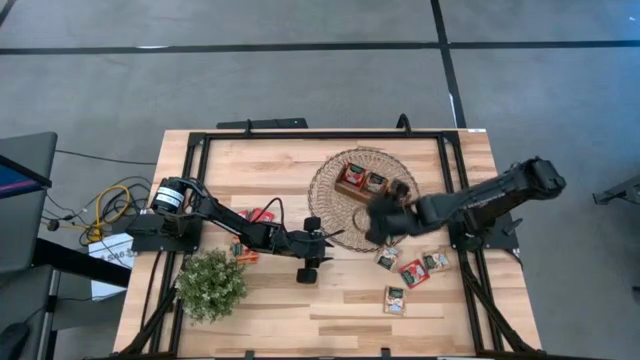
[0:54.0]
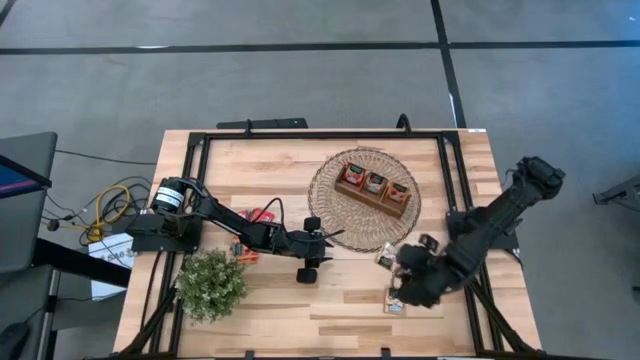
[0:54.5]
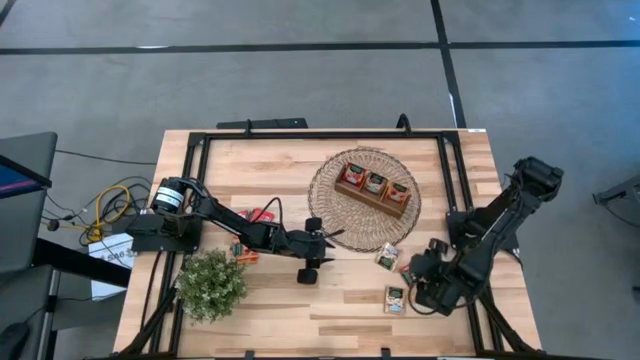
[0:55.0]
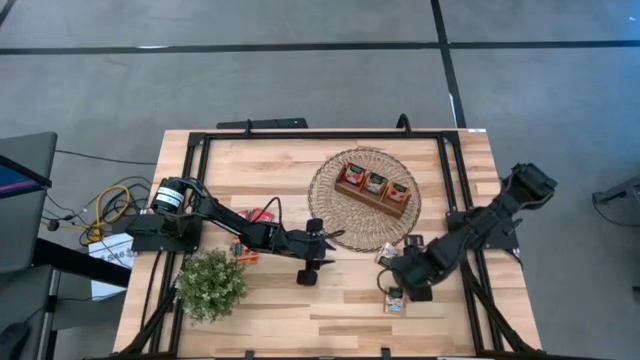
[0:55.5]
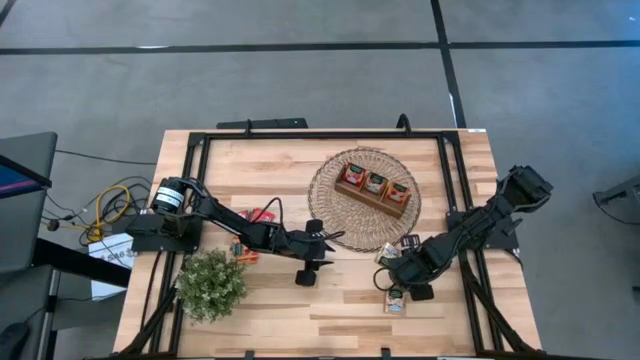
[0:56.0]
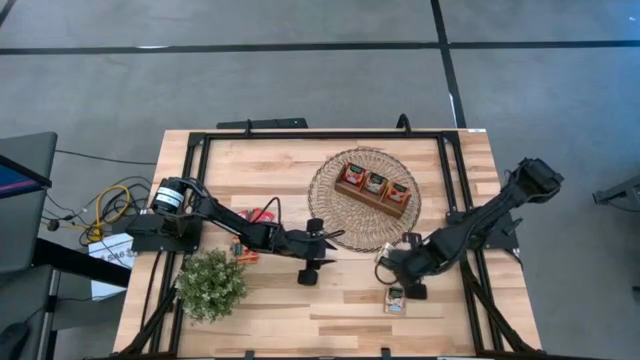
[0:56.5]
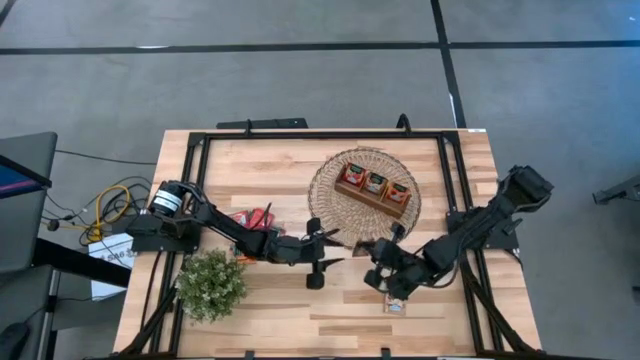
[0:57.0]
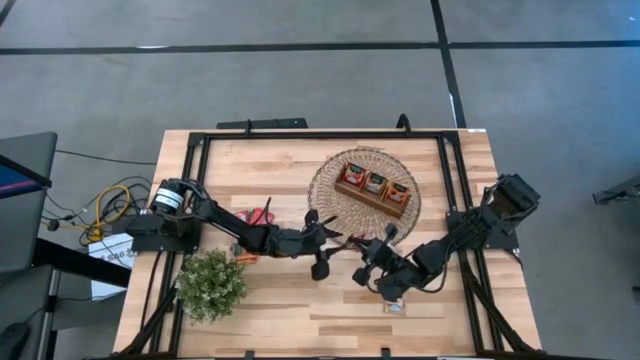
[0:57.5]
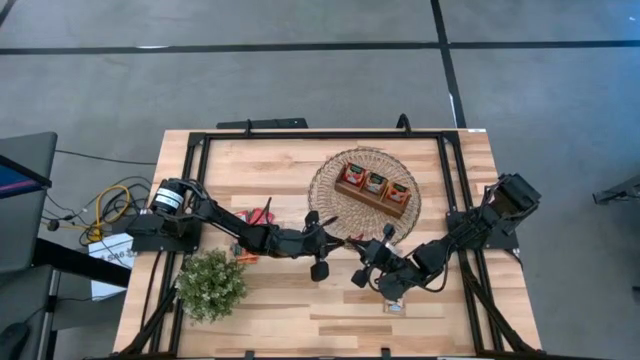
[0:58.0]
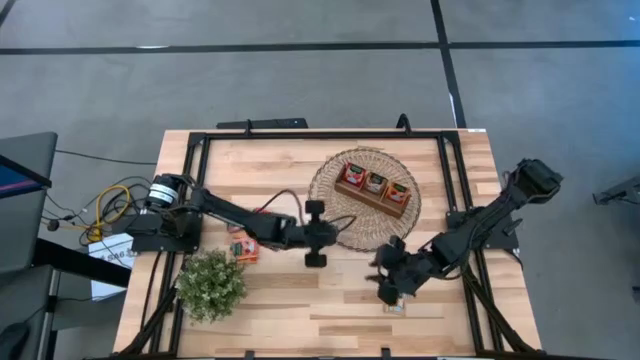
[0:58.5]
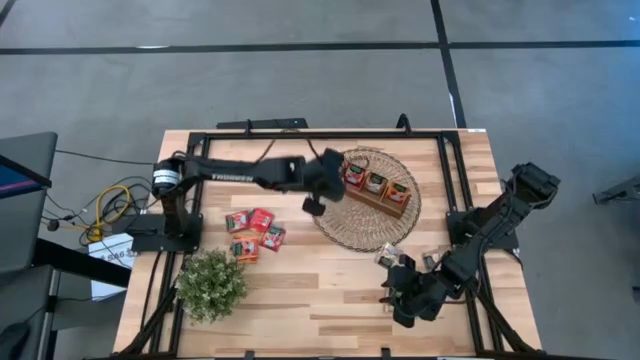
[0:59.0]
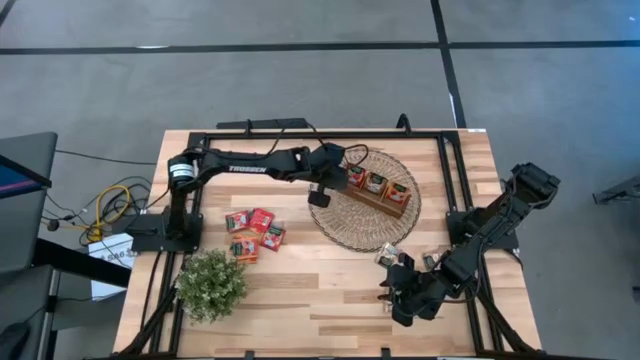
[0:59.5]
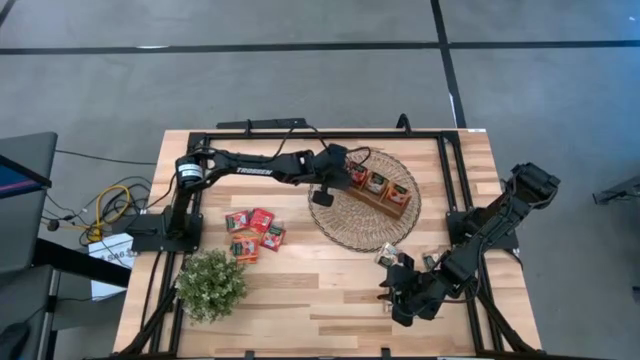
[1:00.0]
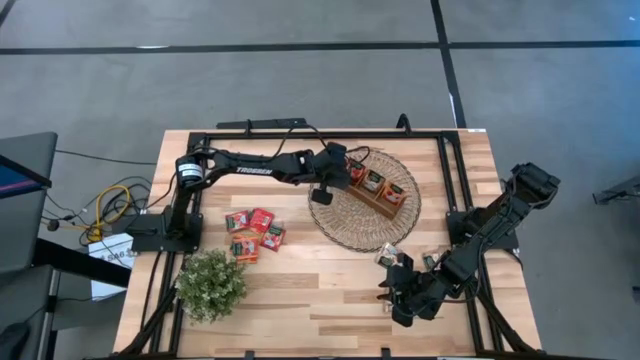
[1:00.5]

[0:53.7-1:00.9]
Task: Pick & Place Tea
Put the red tea bag into the left section of the wooden organizer

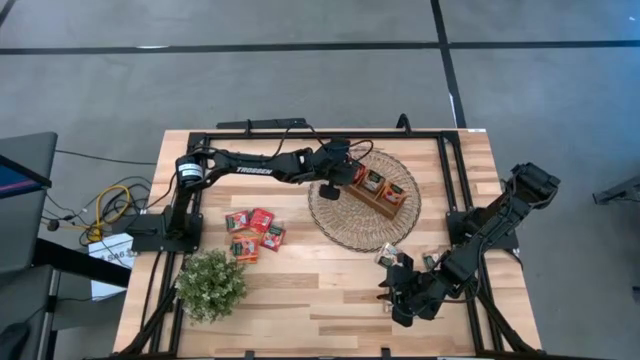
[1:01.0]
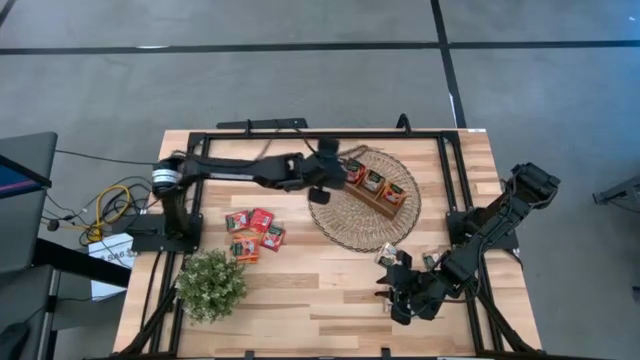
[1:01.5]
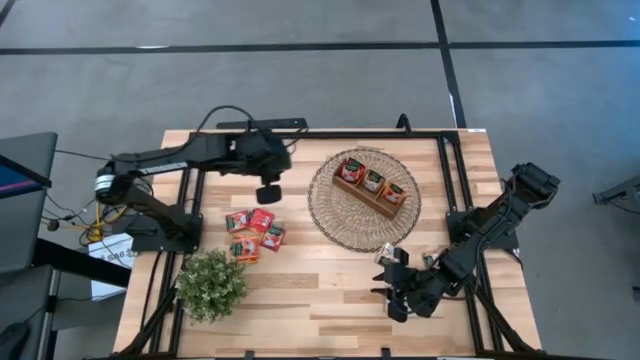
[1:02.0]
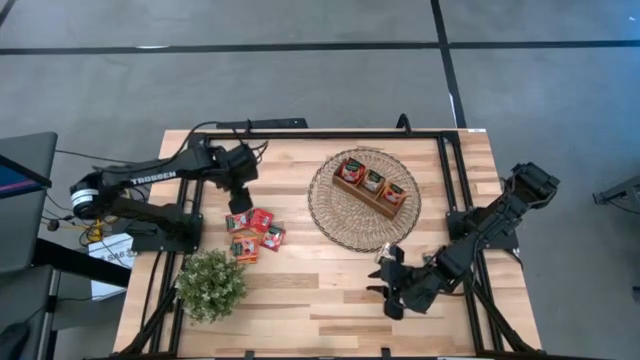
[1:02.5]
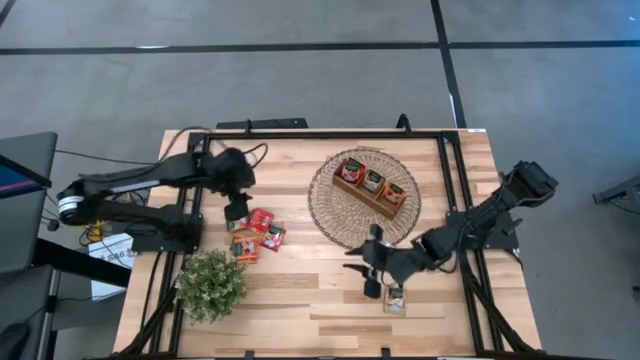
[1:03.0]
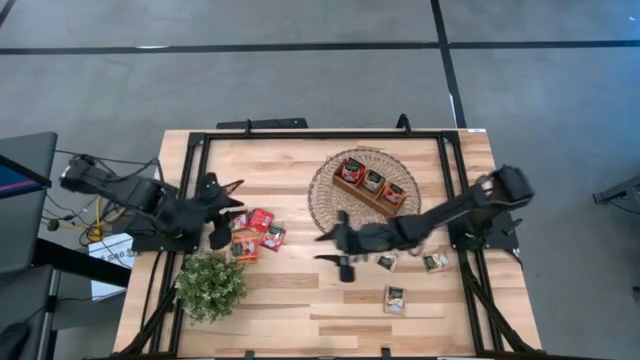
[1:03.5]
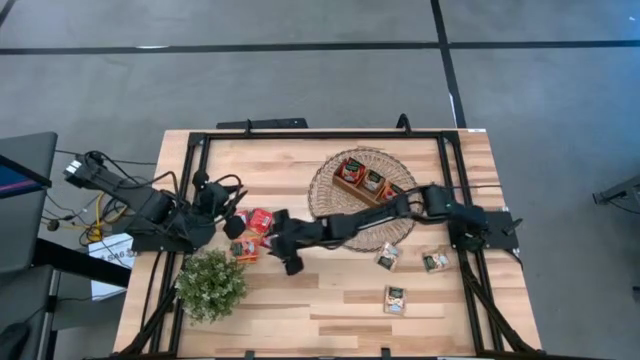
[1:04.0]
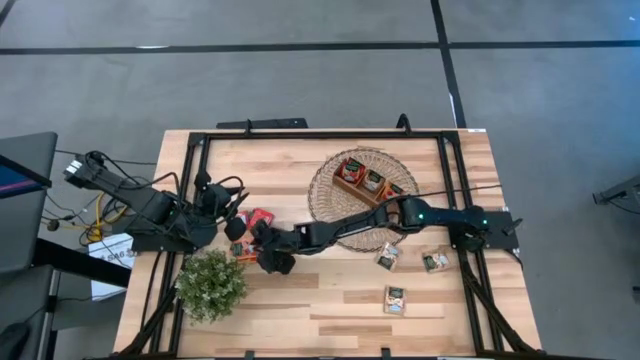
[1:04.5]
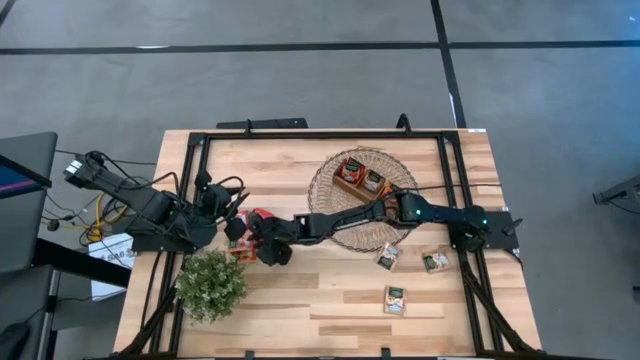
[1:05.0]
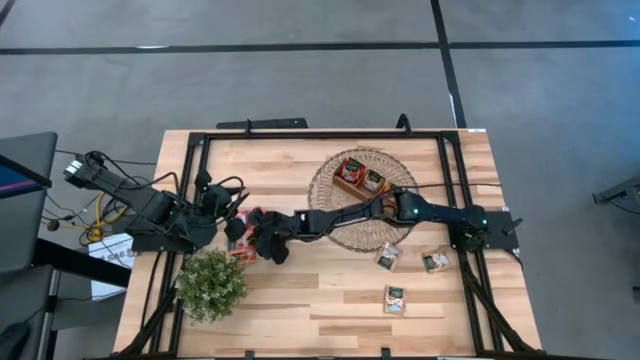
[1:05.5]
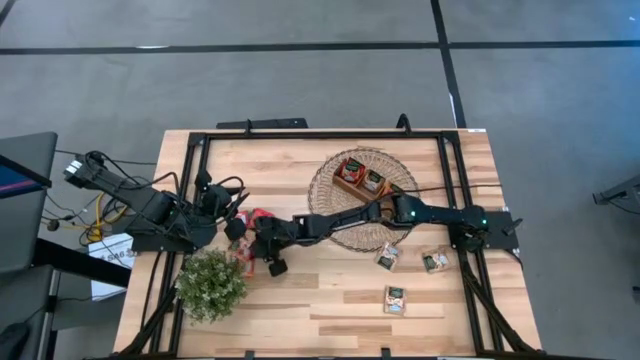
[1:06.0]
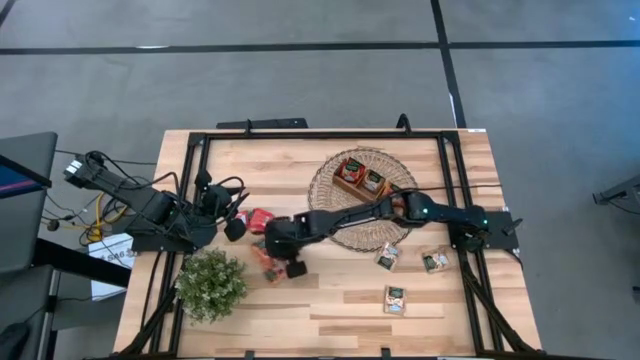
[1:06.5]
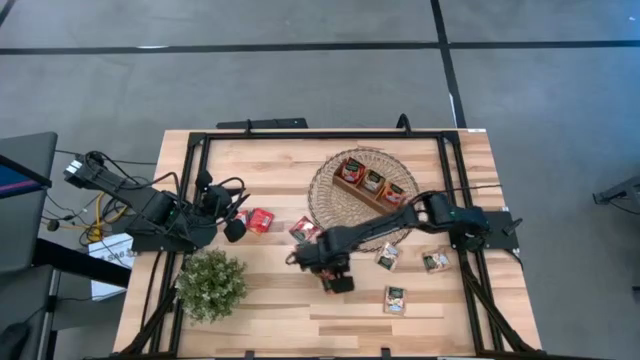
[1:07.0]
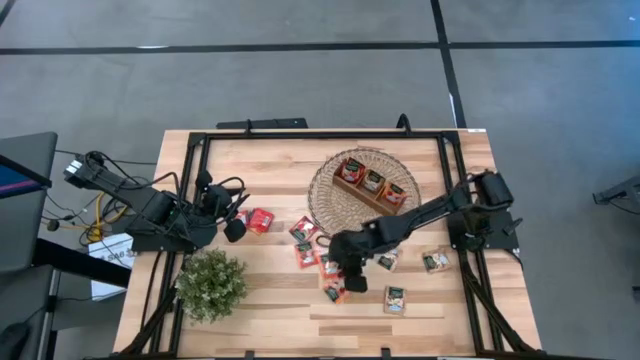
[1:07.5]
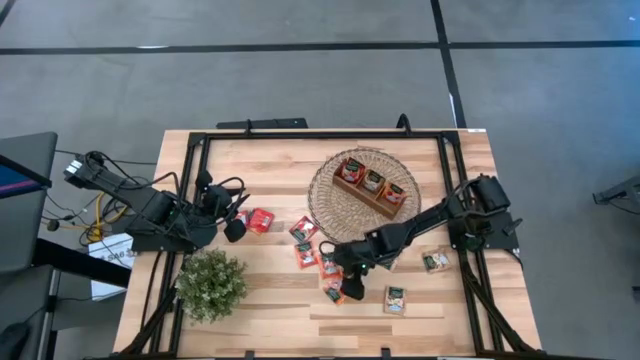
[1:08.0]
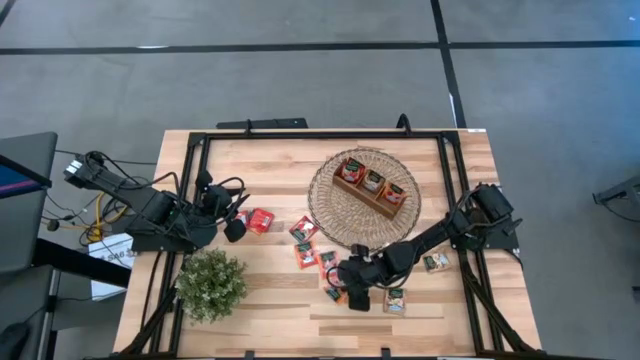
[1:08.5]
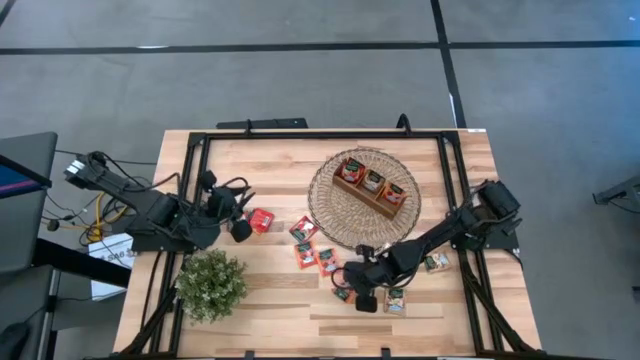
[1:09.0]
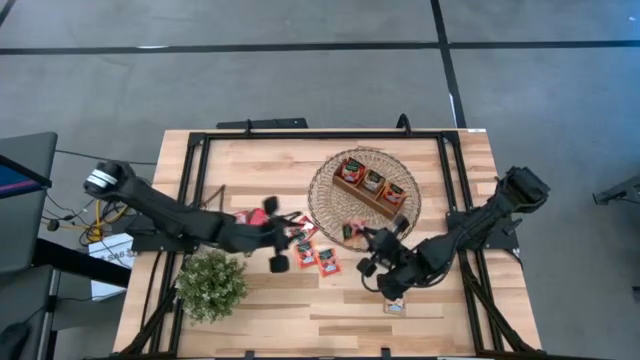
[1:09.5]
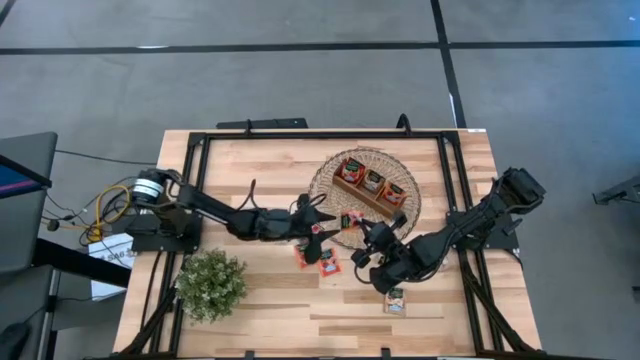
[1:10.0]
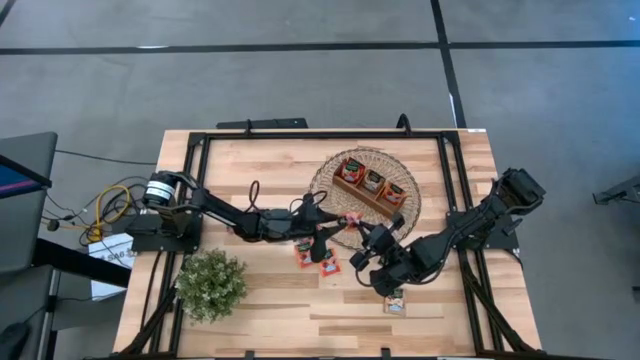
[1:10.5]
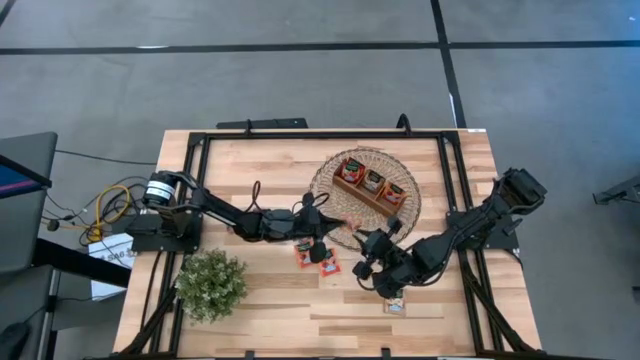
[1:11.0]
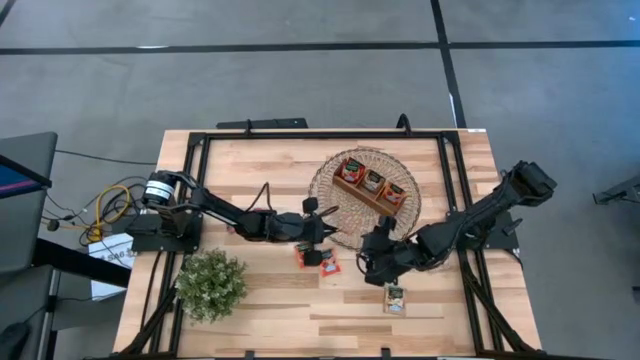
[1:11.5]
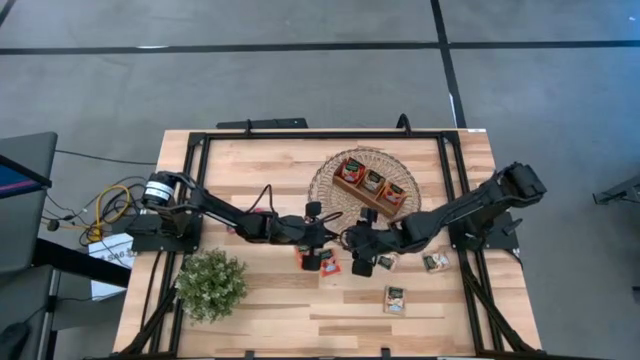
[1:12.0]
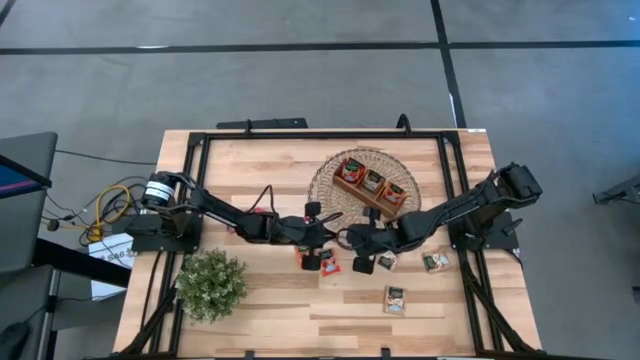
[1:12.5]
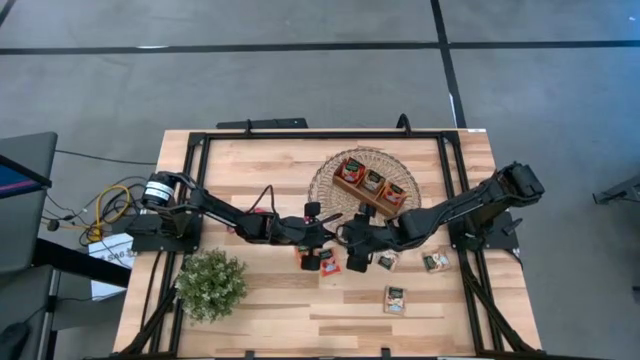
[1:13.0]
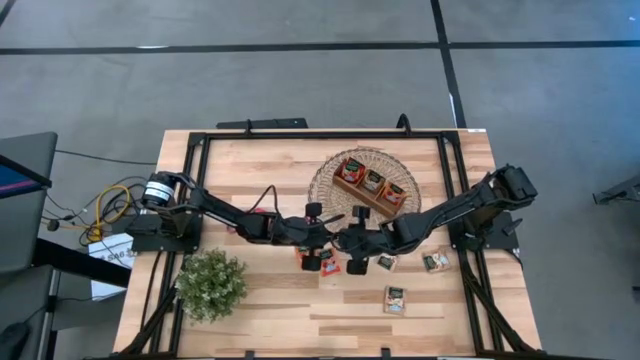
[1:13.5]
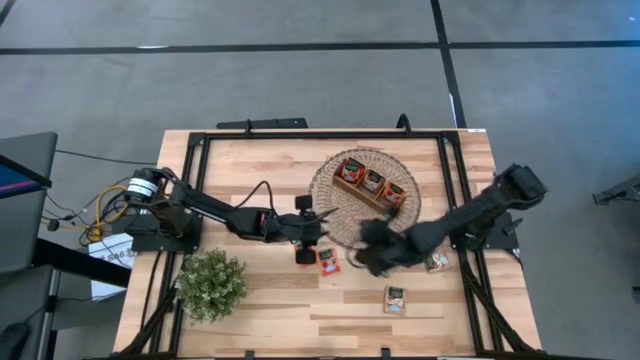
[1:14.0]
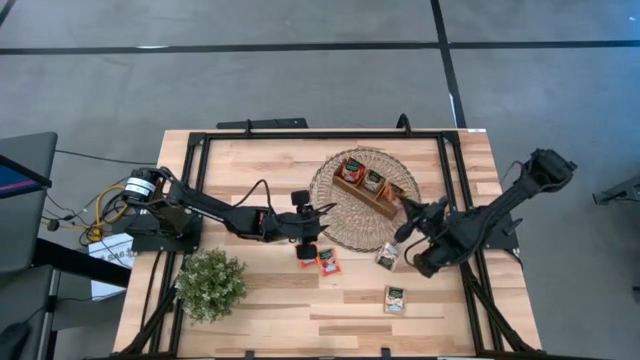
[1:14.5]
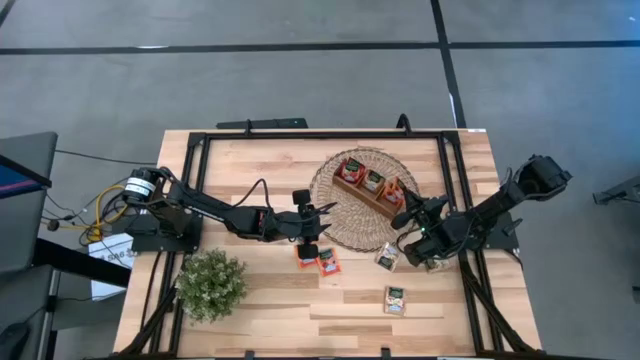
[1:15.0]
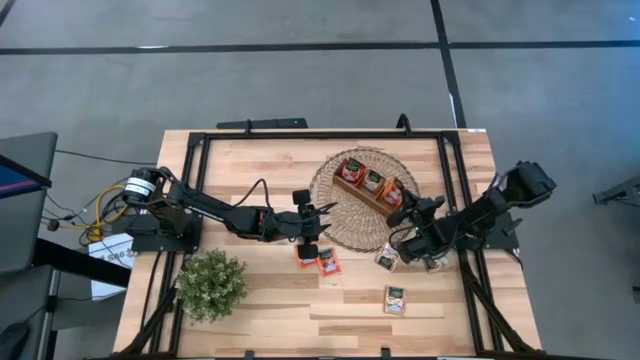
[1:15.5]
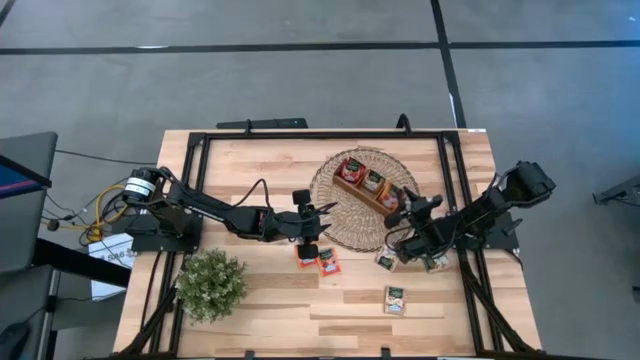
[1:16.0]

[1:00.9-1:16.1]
Put the orange tea bag into the right section of the wooden organizer
